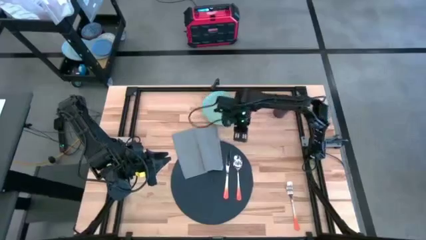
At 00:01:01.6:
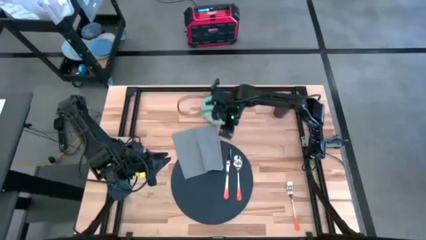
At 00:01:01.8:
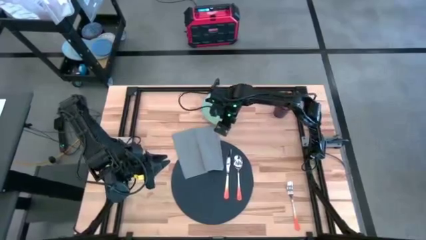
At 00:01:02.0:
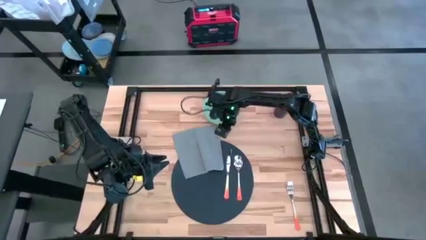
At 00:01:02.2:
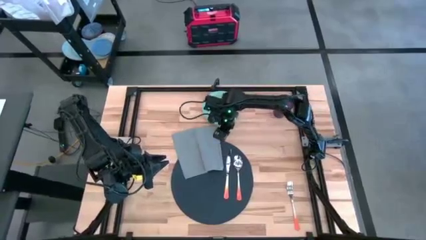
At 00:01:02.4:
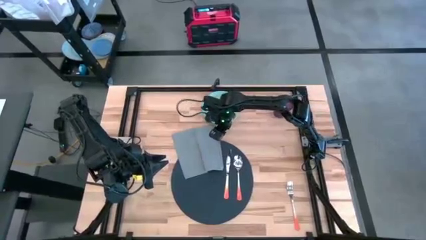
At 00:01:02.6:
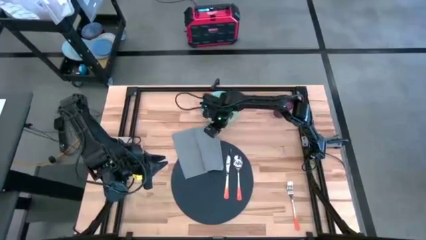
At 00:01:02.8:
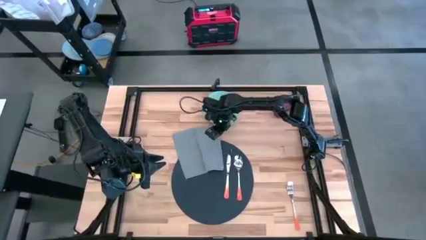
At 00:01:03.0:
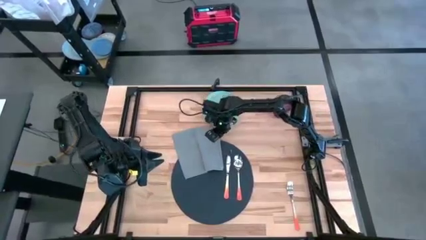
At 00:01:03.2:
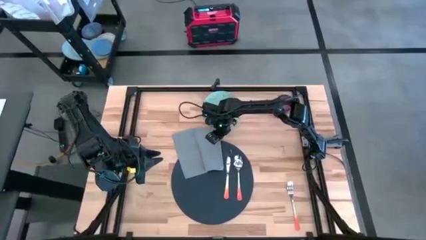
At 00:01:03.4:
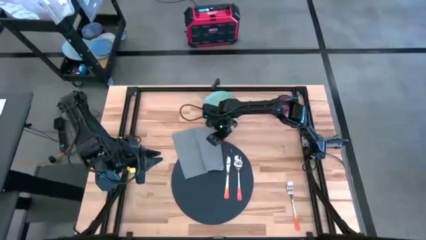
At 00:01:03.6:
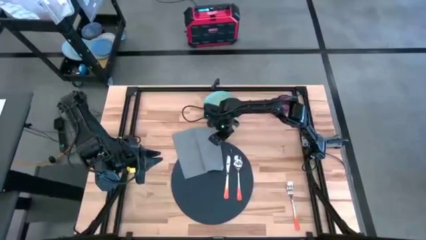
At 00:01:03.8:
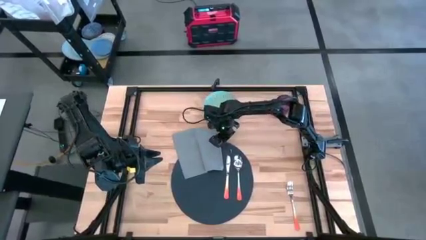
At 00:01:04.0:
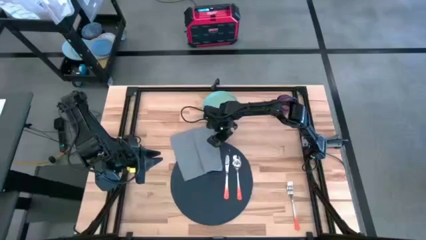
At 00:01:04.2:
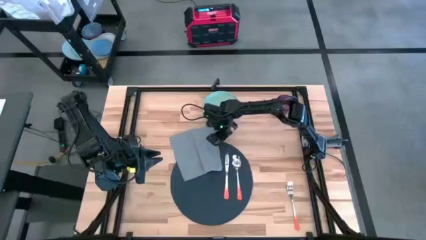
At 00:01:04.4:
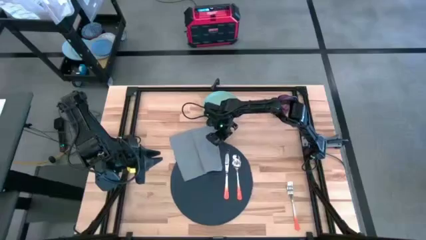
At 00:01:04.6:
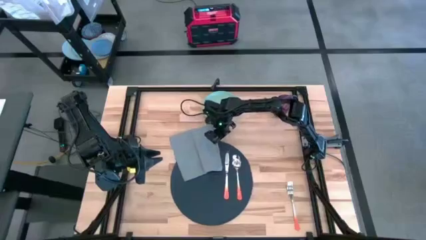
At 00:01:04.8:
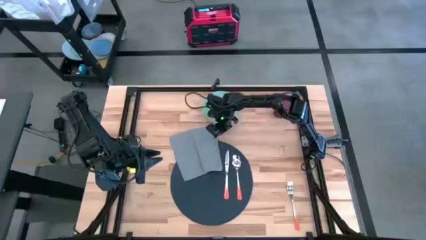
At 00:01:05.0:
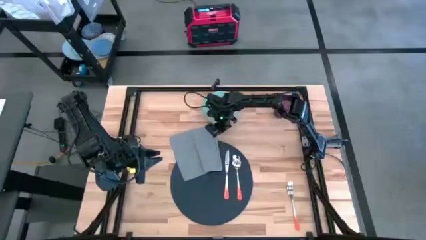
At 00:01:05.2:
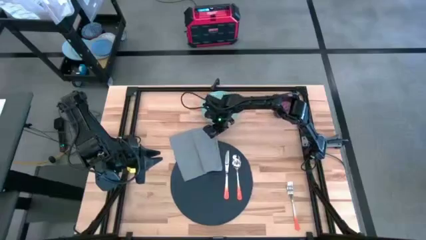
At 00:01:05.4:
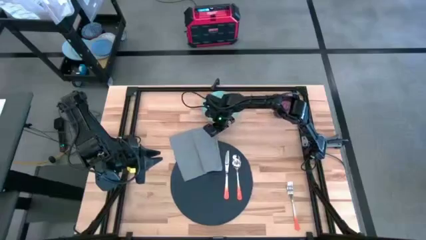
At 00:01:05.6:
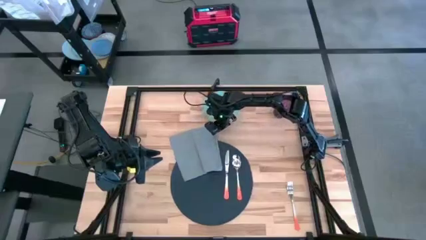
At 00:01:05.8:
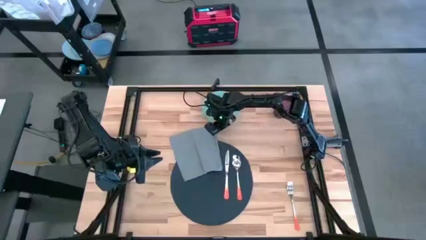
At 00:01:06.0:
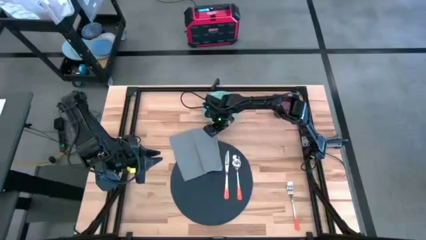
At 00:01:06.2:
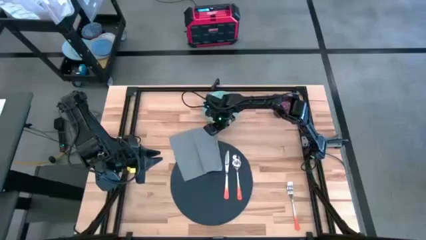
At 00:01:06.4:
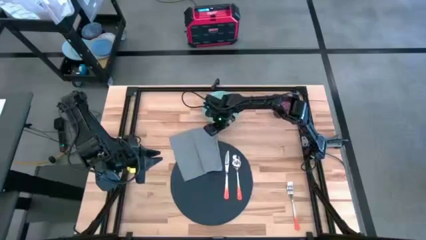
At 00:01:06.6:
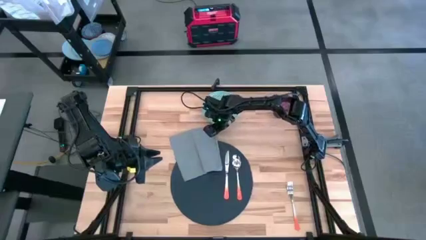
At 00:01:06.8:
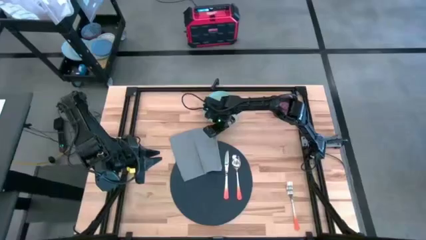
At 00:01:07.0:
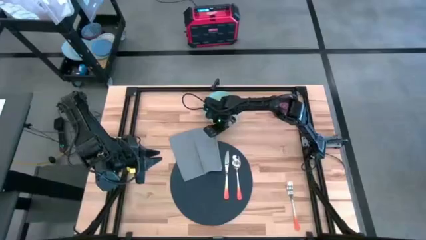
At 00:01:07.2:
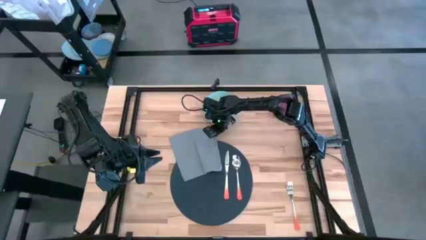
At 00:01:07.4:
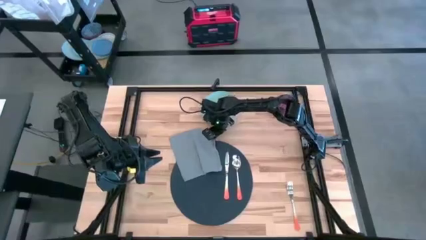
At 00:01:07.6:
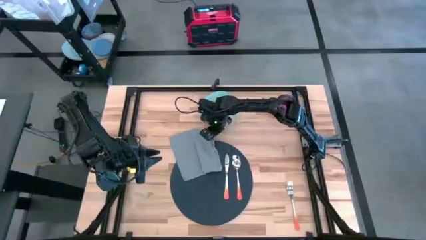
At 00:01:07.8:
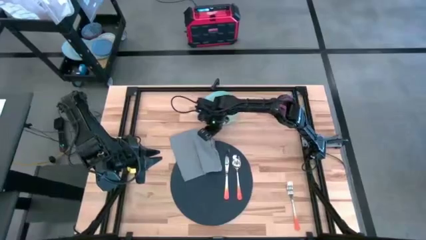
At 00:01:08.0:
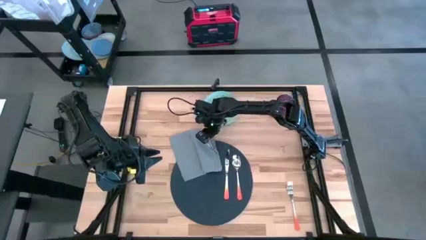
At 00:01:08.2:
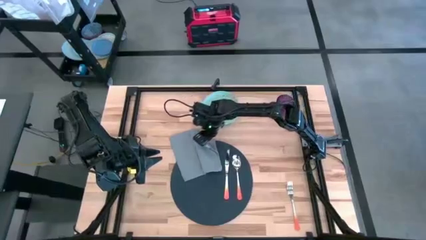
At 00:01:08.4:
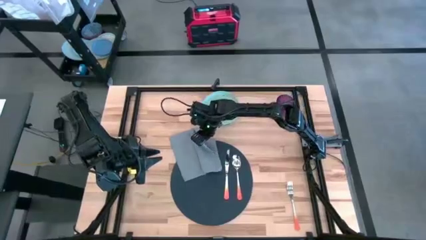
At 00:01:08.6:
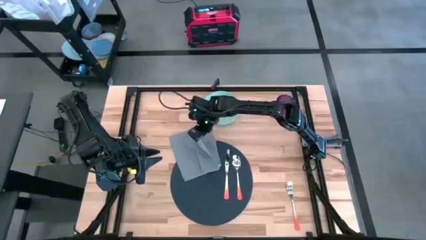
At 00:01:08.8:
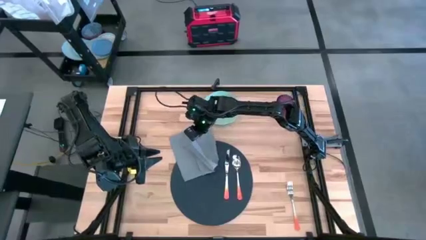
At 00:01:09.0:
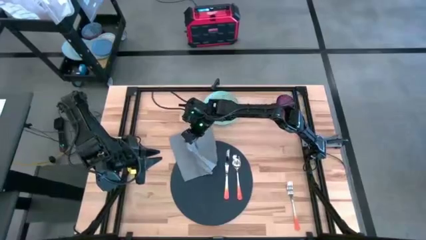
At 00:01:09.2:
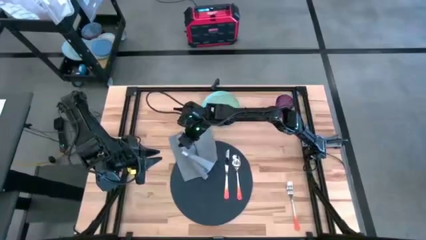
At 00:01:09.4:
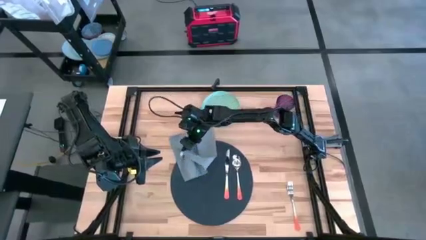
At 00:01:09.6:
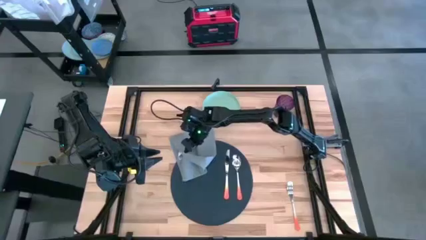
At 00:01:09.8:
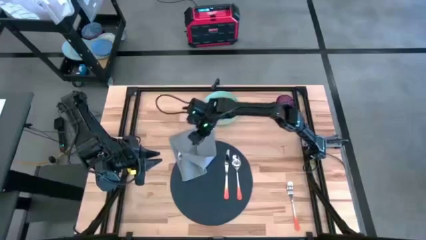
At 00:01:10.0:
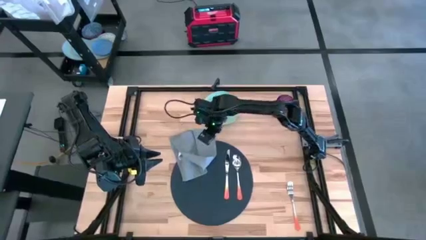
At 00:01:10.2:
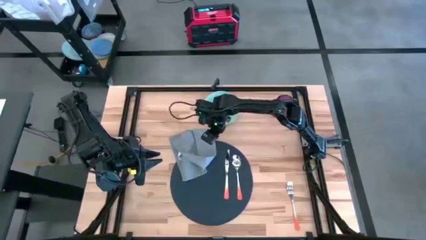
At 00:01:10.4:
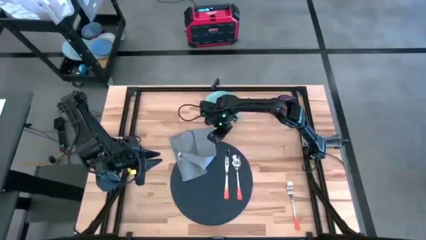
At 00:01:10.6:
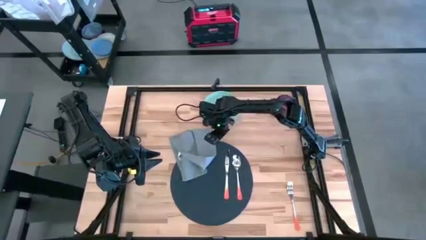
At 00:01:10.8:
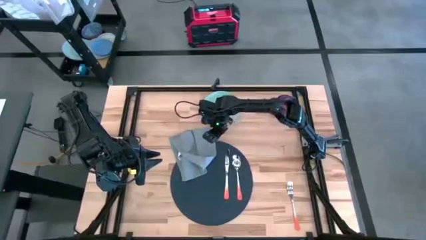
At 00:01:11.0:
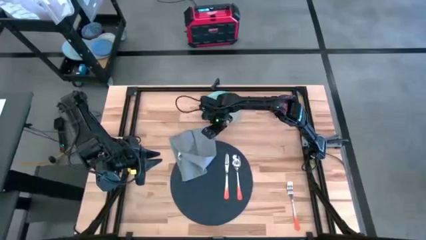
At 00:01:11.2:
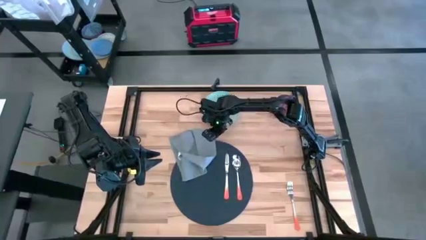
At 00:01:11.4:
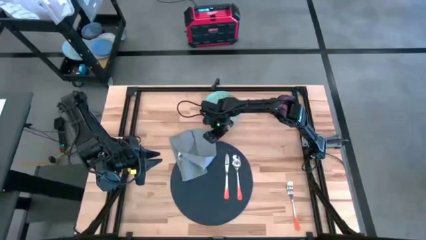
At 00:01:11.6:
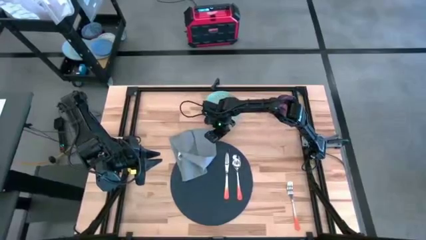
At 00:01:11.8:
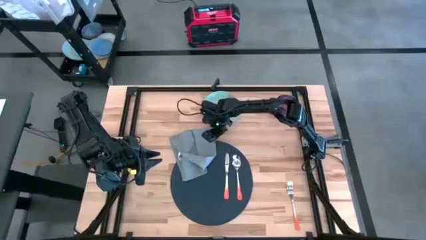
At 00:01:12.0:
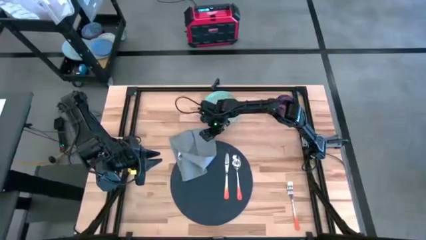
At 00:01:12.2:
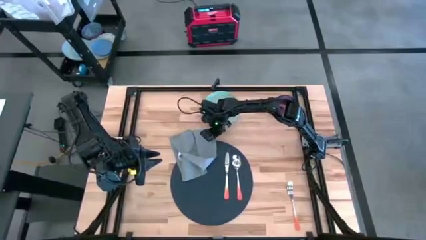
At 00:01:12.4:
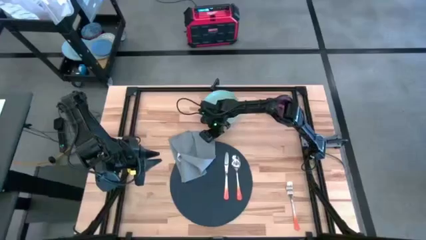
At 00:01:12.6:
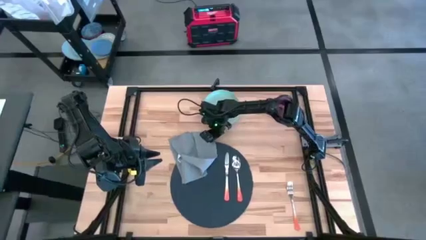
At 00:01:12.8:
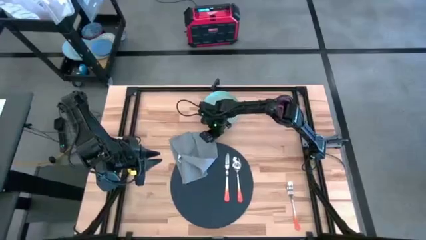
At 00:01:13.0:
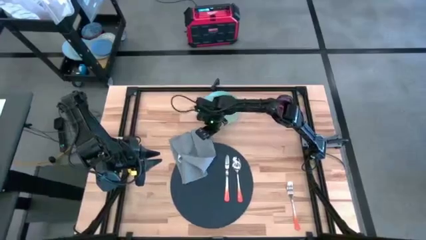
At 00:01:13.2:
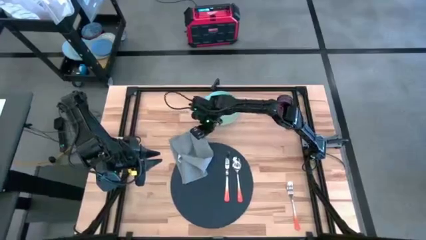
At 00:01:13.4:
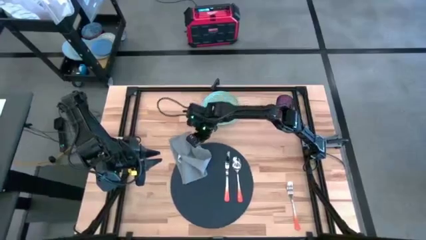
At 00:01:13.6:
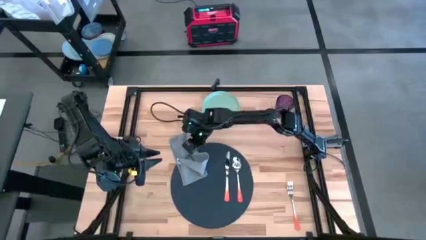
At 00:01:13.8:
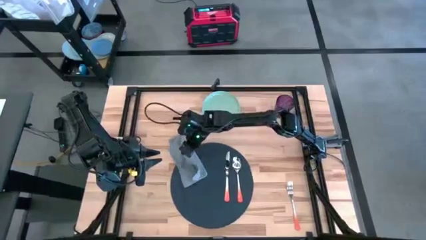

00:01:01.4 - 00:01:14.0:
Task: Set table place
Fold the gray table napkin

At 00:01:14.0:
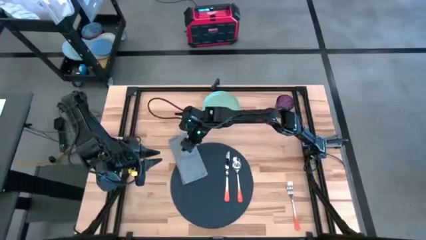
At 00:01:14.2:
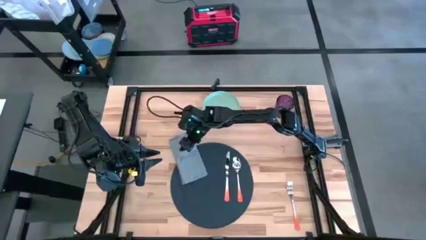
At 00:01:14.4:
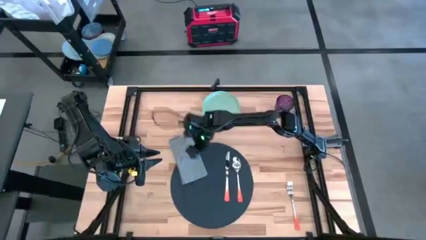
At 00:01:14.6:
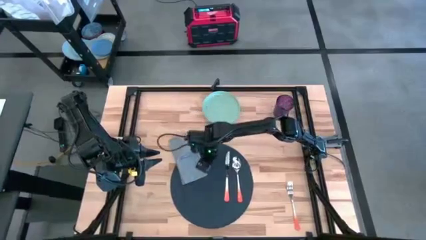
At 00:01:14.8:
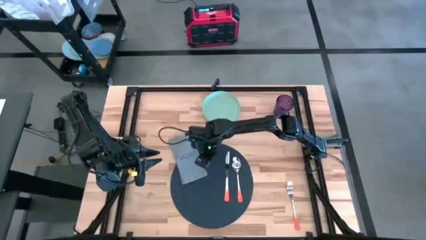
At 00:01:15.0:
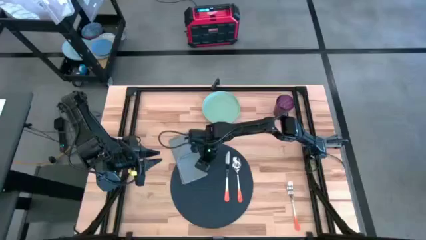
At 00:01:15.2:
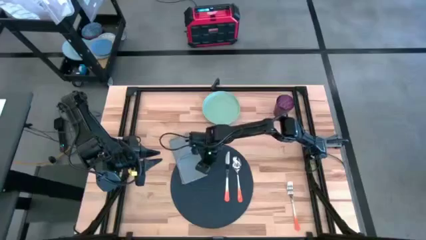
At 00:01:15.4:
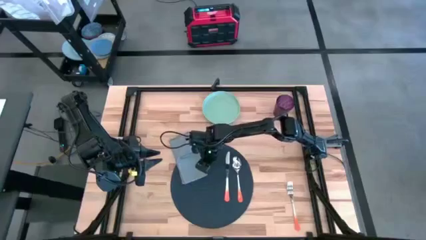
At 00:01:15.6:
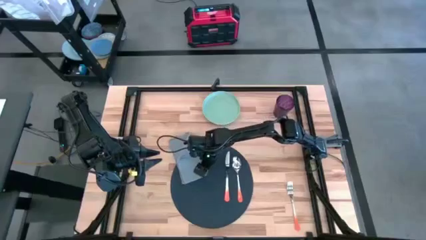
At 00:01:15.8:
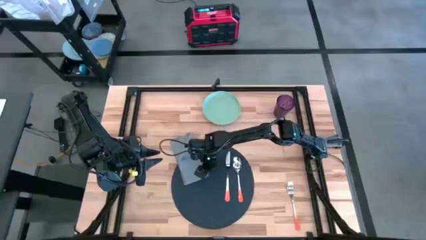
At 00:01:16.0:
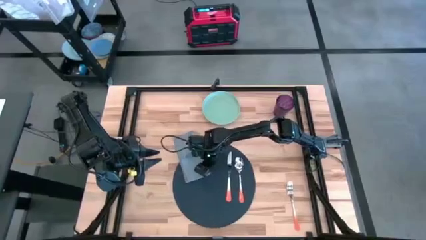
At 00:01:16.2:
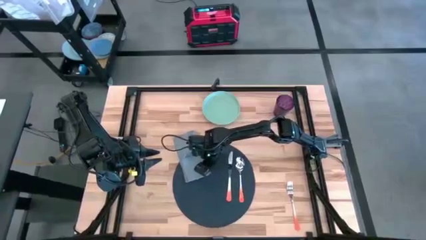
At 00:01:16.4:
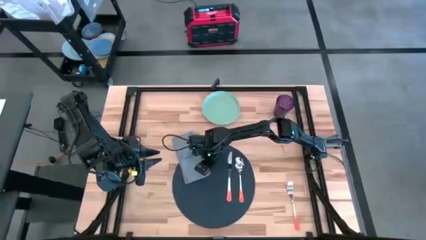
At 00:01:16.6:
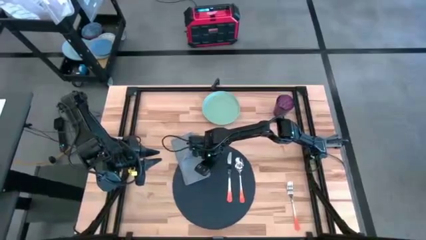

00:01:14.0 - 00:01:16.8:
Fold the gray table napkin
